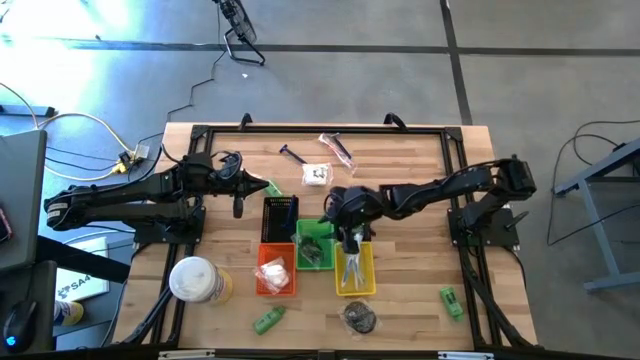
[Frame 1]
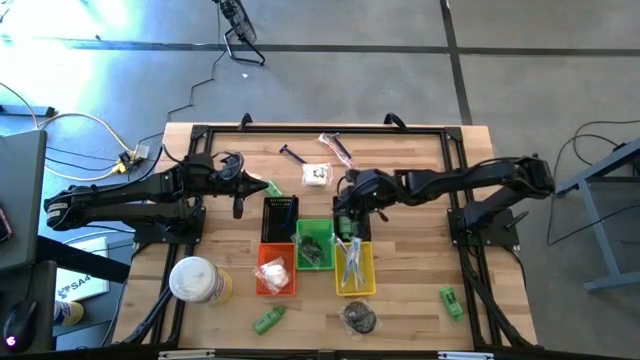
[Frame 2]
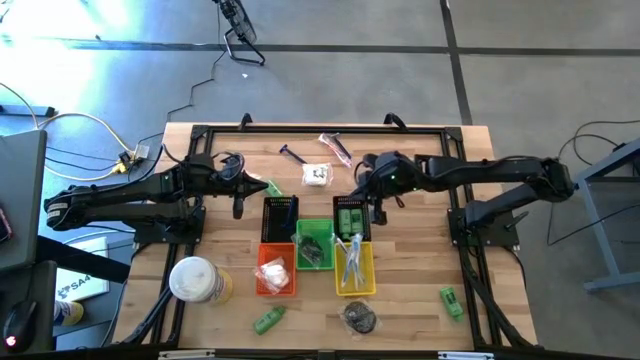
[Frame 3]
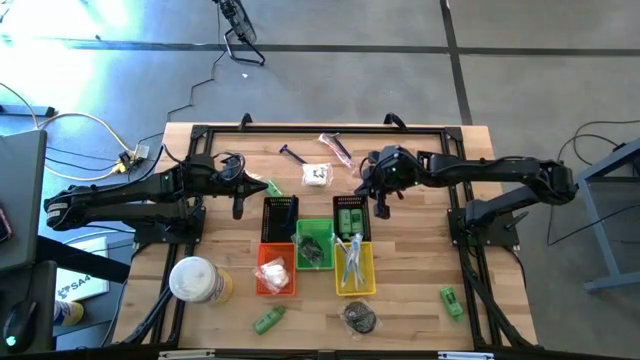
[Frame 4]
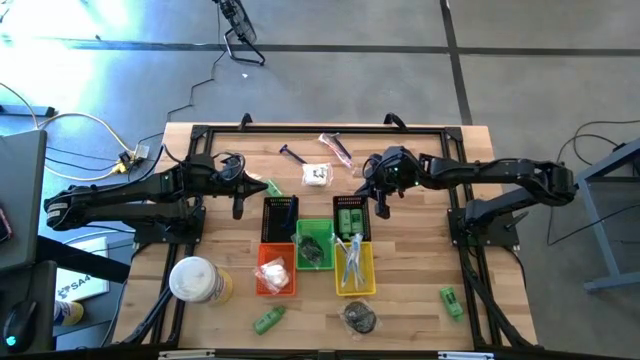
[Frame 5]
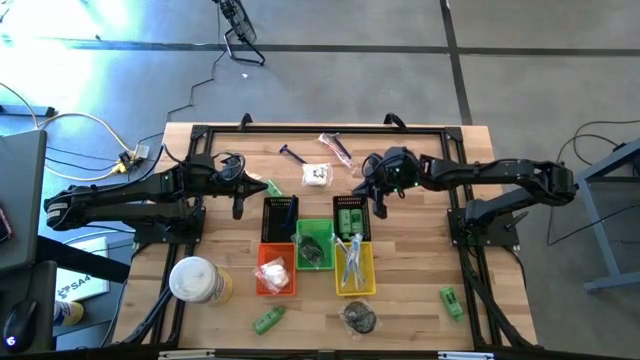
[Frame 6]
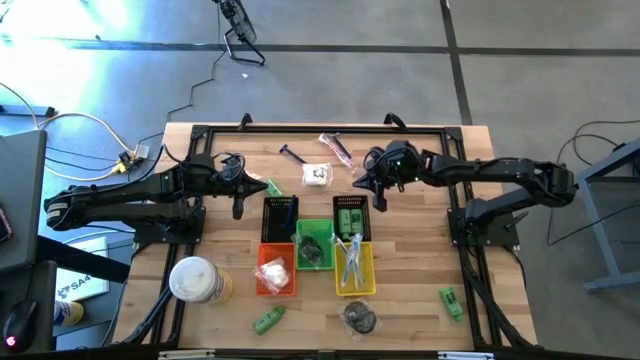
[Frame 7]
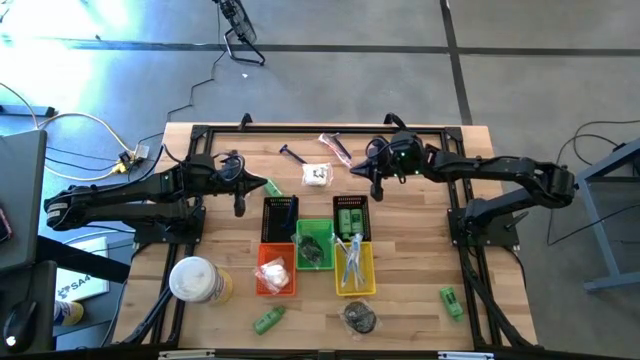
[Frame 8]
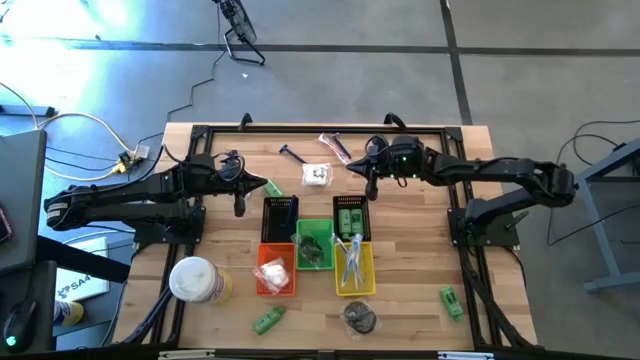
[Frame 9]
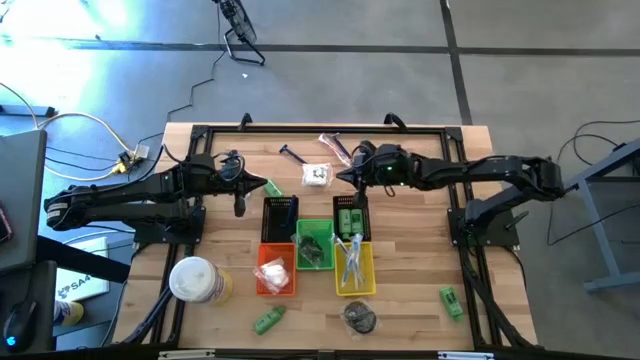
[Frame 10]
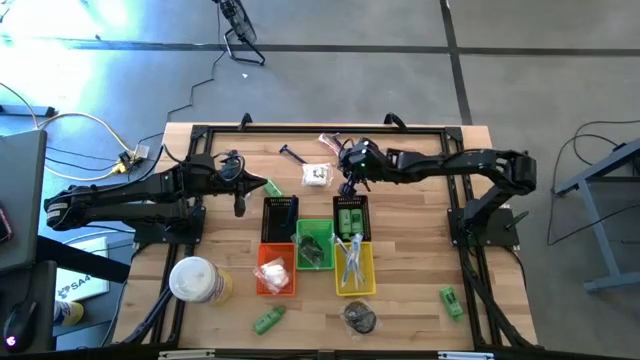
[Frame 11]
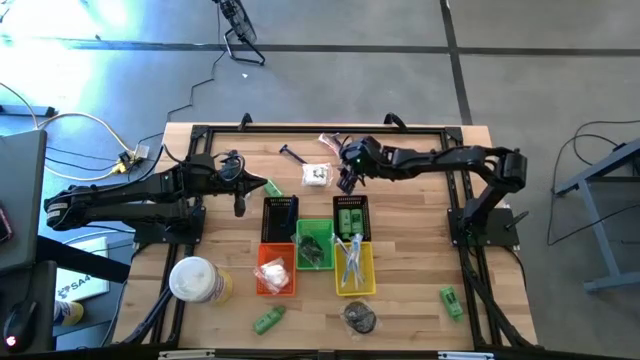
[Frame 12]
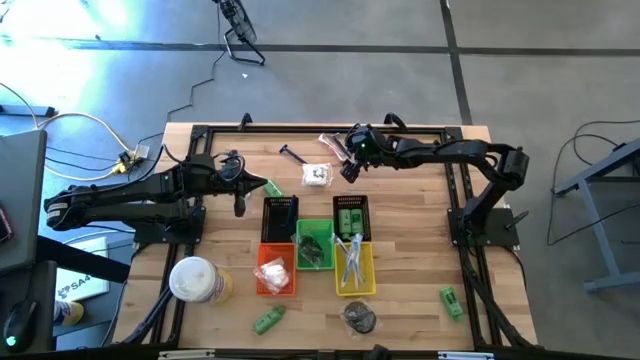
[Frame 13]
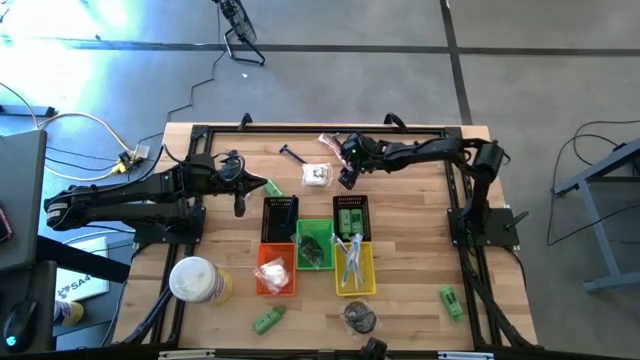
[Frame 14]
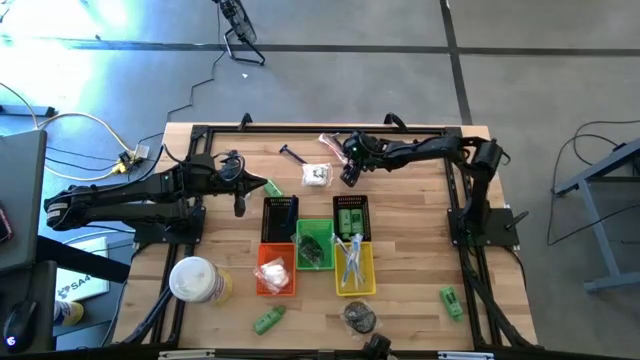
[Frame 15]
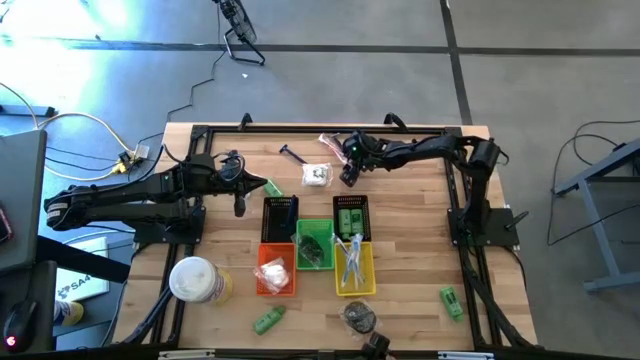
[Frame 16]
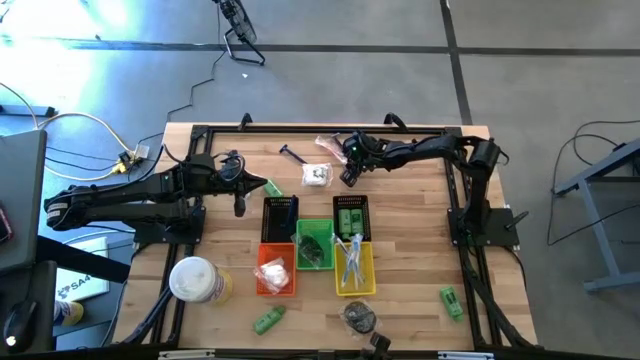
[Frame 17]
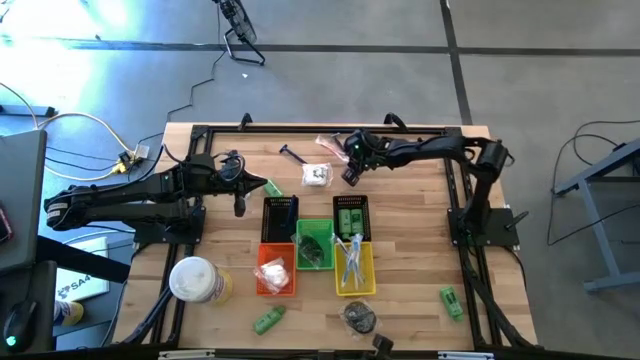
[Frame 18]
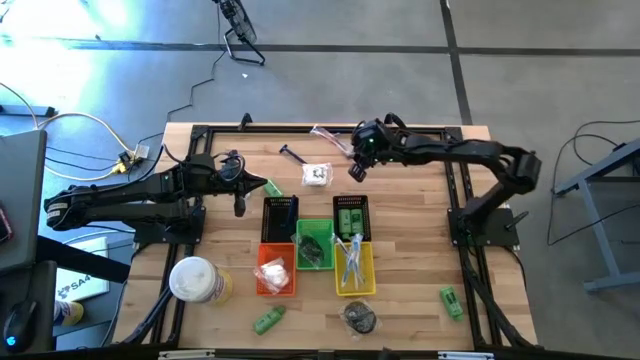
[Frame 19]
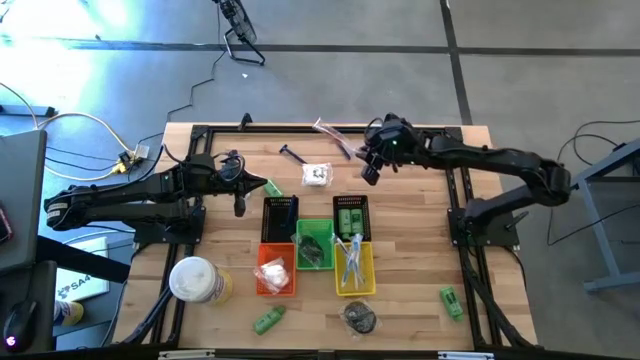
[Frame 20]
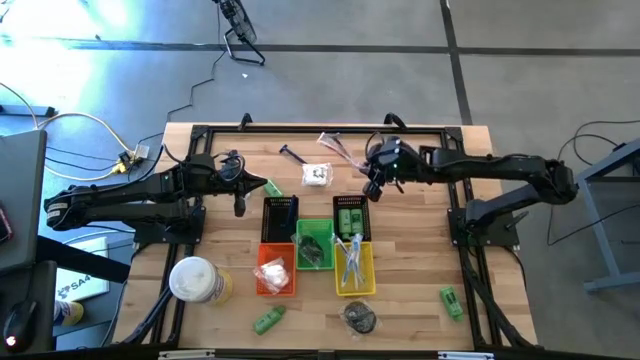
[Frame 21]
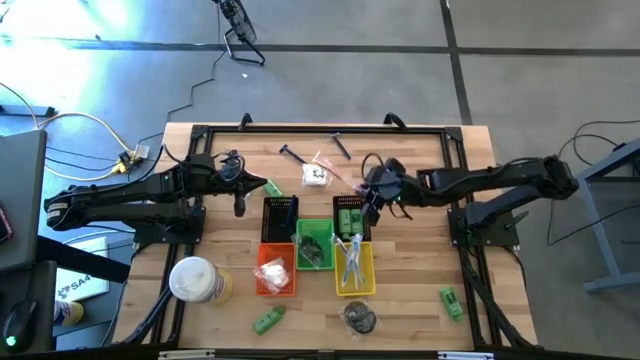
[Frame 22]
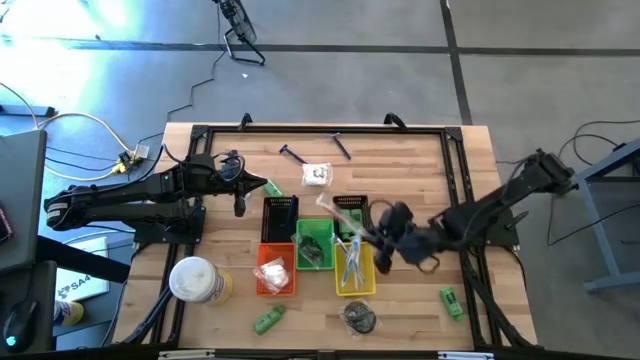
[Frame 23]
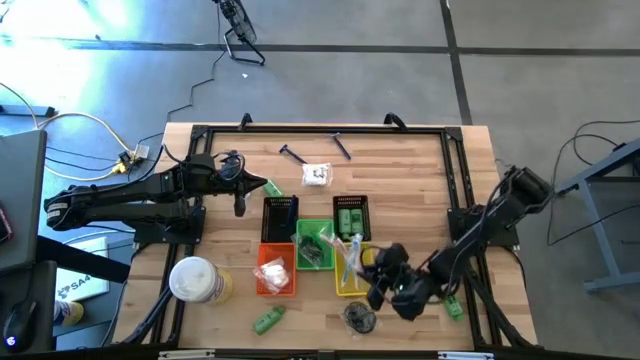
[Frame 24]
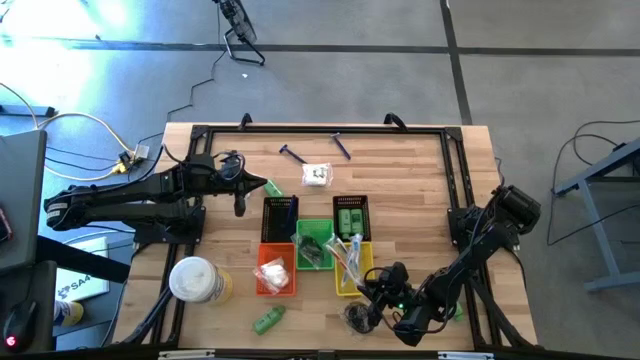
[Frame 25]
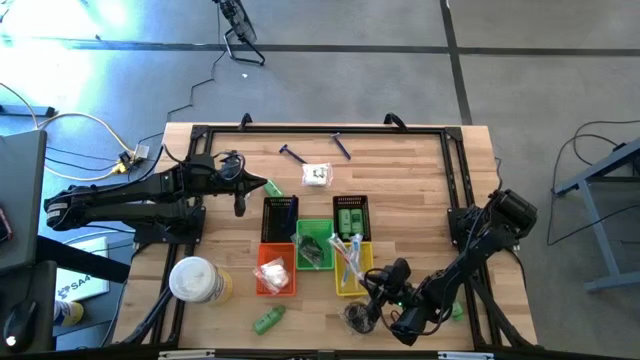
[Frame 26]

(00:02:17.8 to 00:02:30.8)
Task: Pick & Place Travel size toiletries
Put the orange toothbrush into the yellow bin

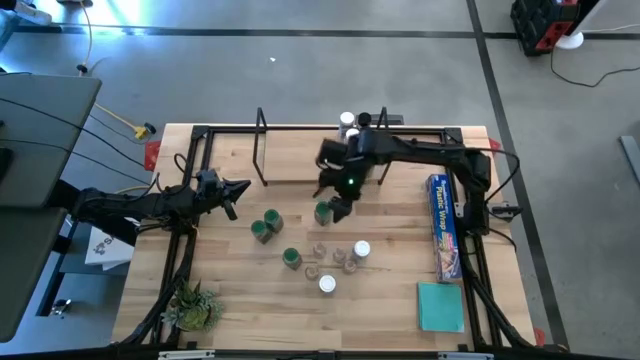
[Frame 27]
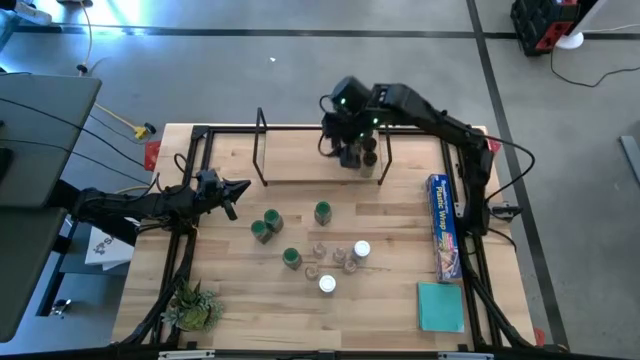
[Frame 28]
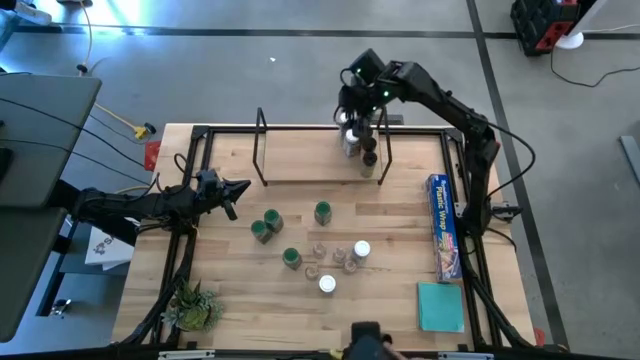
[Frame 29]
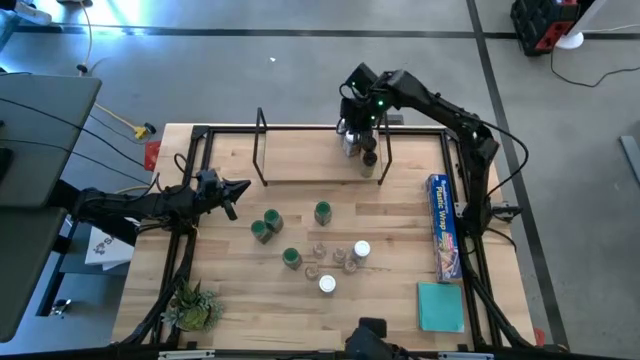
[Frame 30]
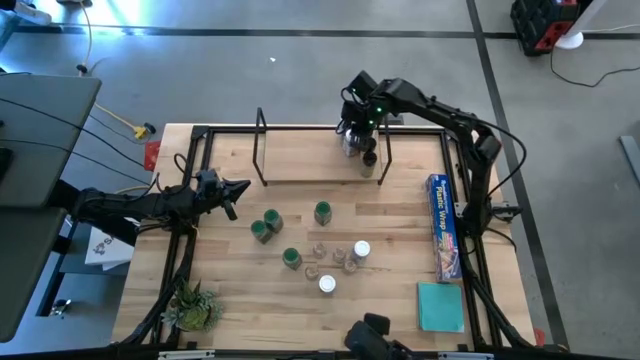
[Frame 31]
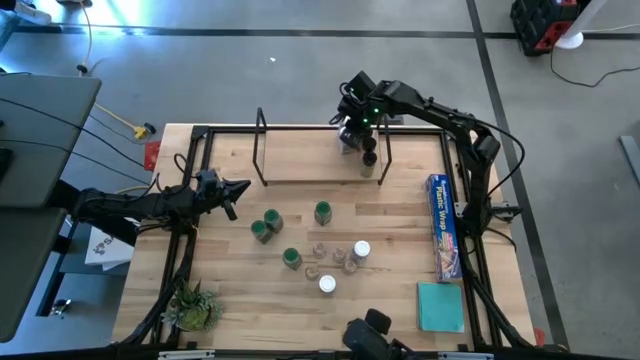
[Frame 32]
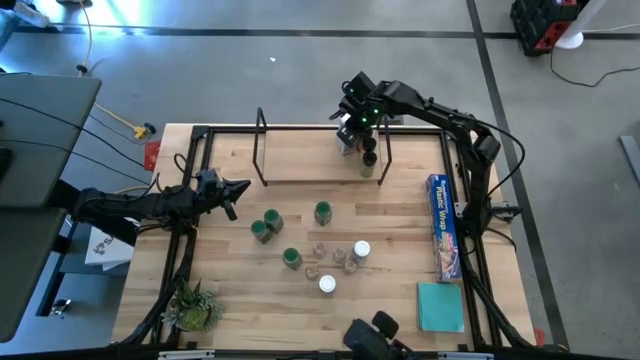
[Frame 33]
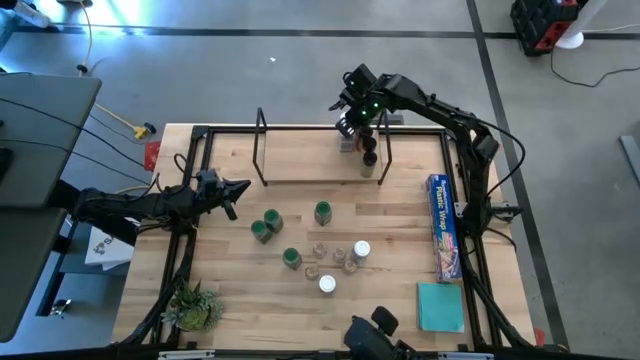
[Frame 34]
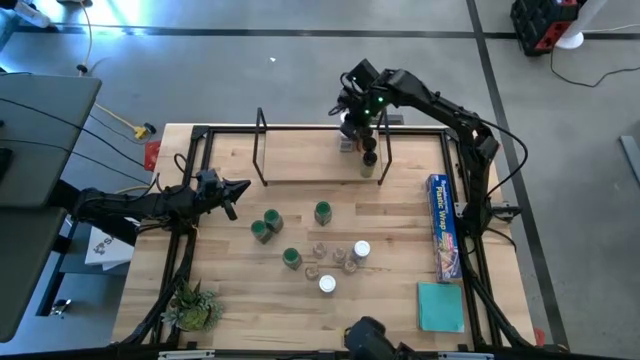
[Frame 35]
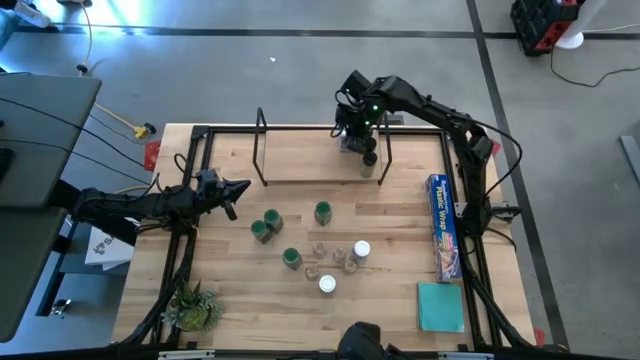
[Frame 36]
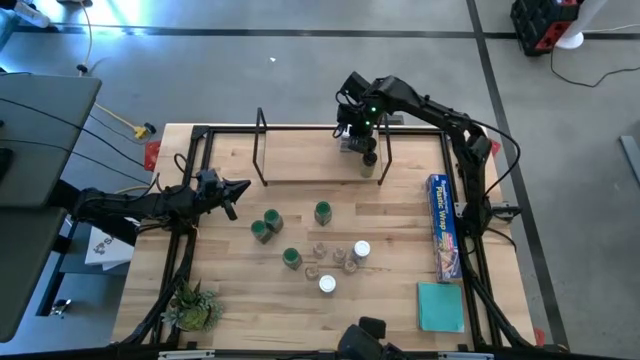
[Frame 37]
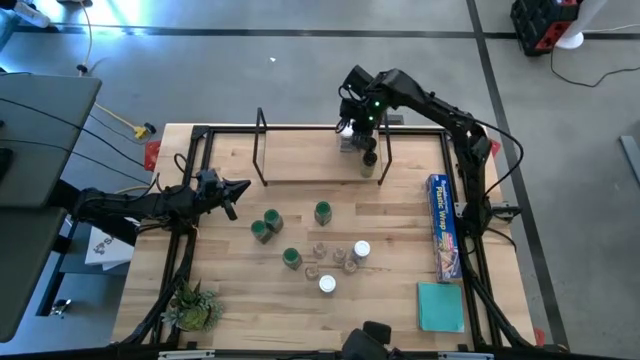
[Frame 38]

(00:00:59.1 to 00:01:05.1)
Task: Shelf spices
Adjust the bottom white seasoning bottle on the shelf
